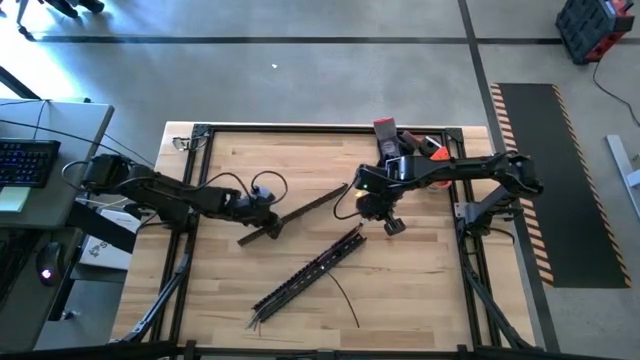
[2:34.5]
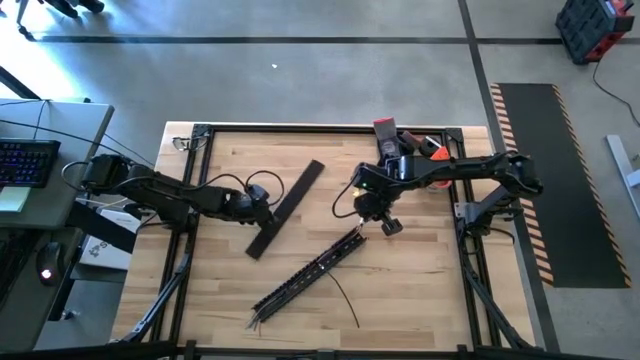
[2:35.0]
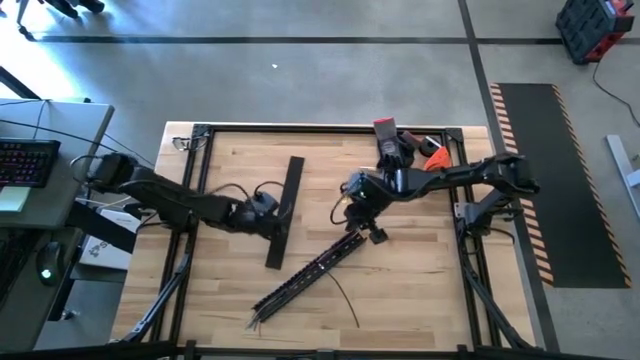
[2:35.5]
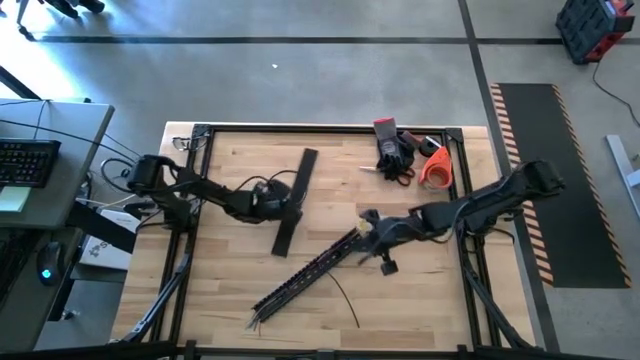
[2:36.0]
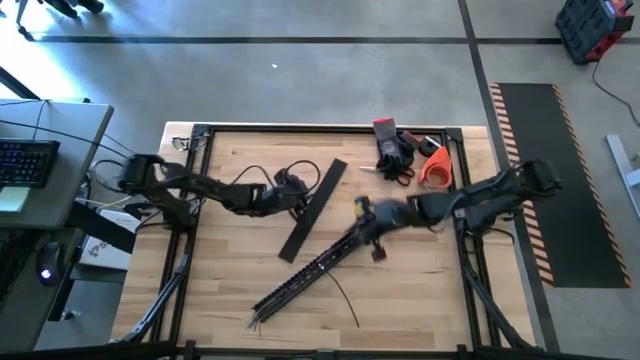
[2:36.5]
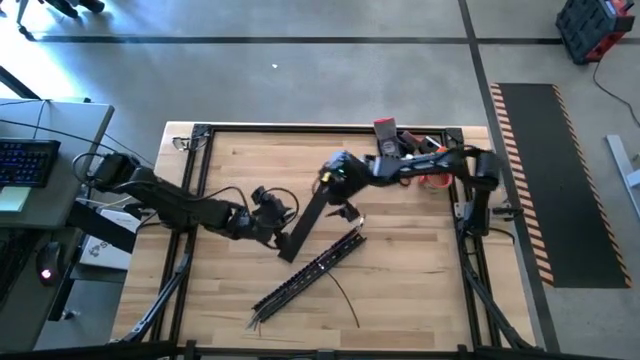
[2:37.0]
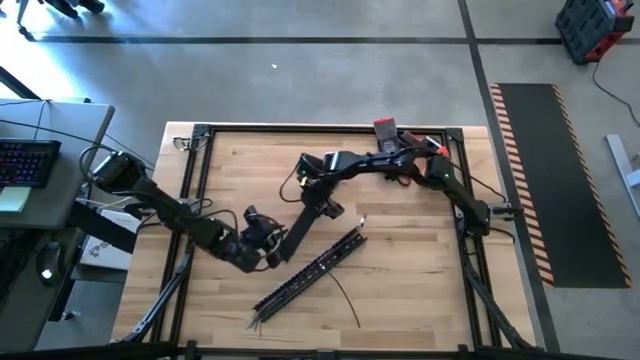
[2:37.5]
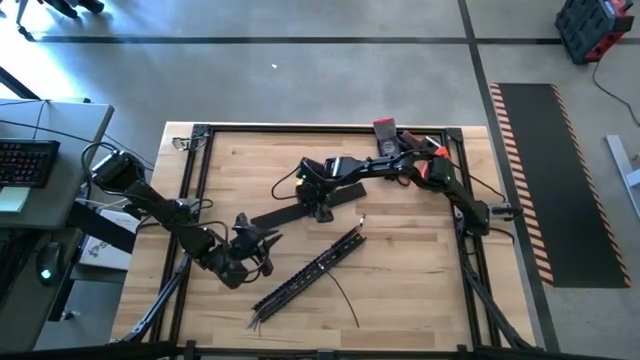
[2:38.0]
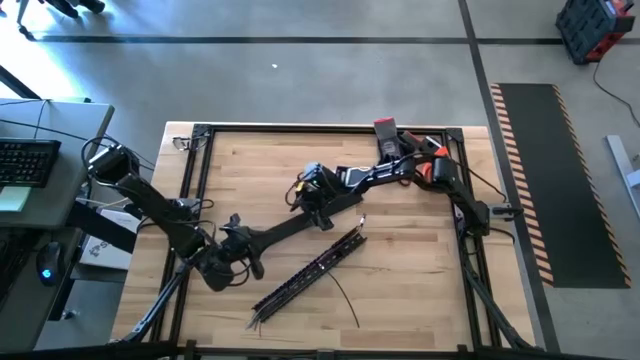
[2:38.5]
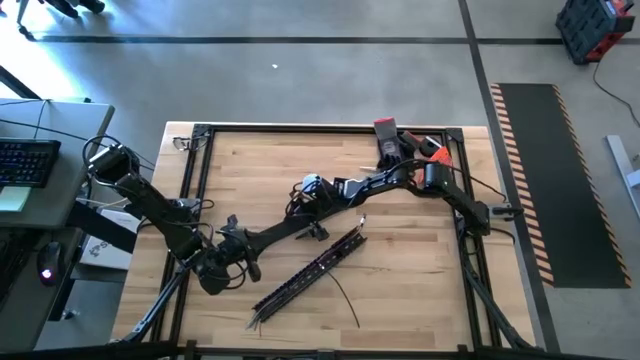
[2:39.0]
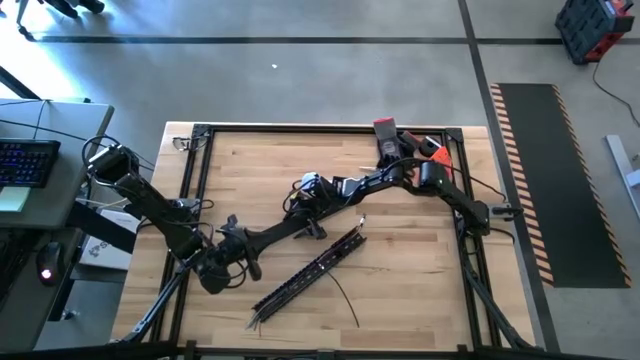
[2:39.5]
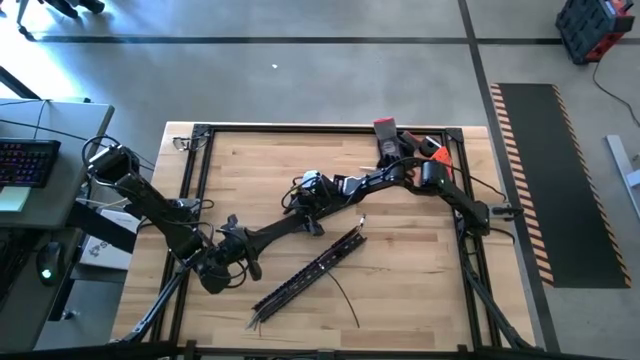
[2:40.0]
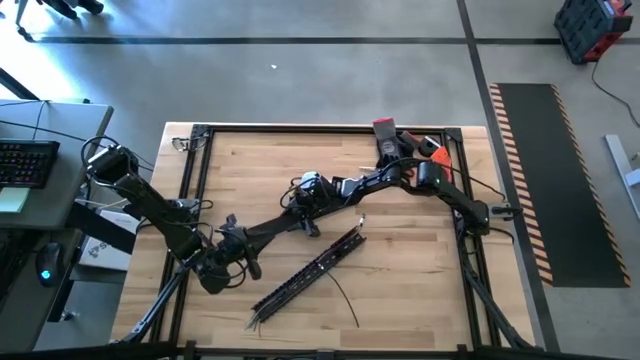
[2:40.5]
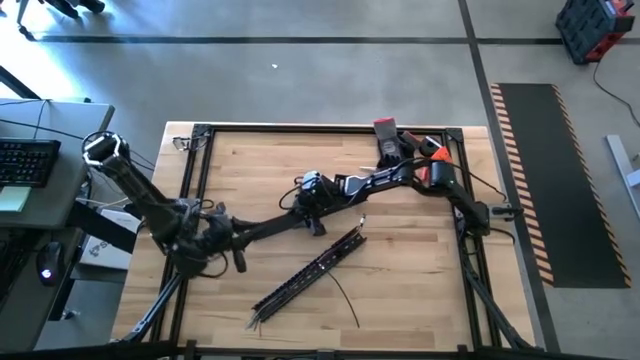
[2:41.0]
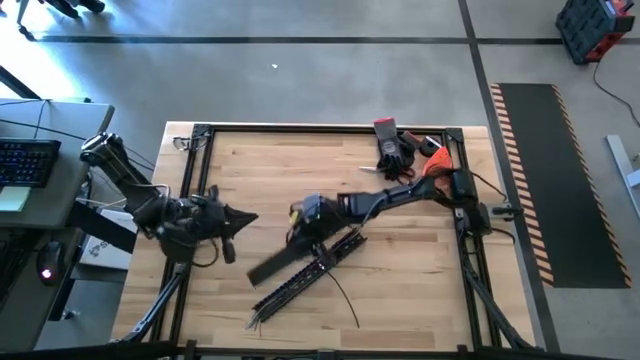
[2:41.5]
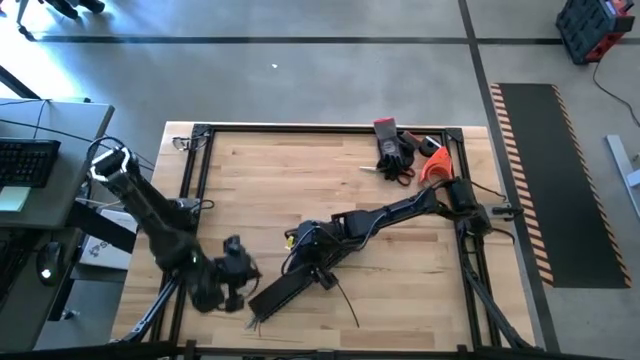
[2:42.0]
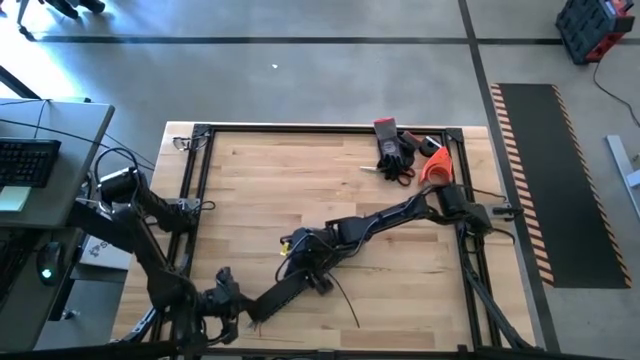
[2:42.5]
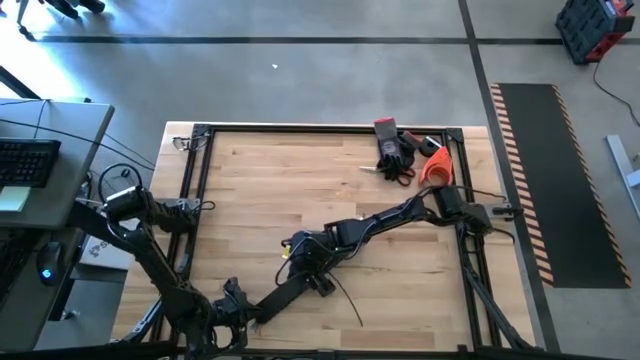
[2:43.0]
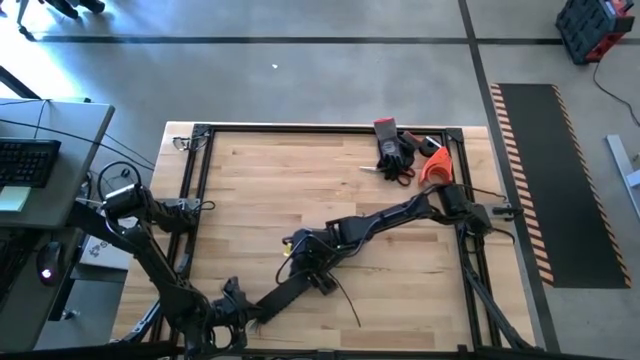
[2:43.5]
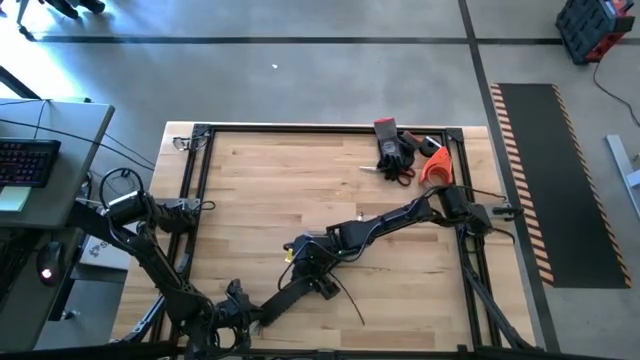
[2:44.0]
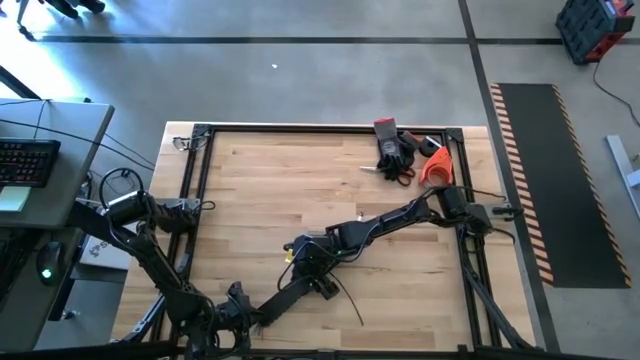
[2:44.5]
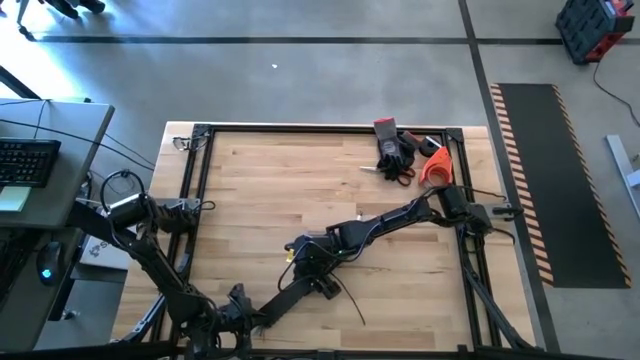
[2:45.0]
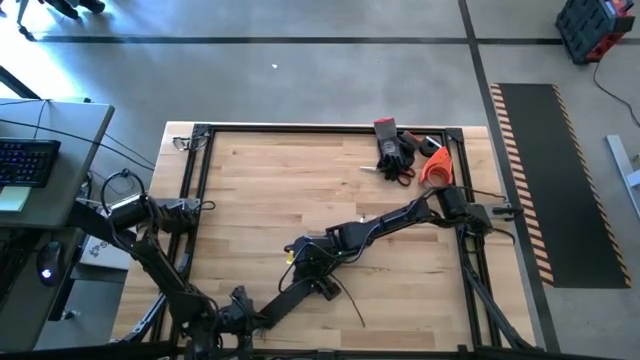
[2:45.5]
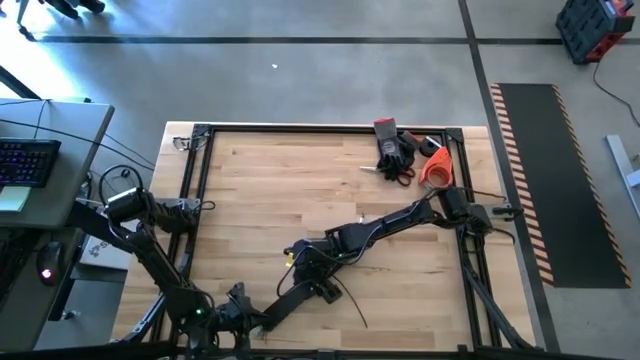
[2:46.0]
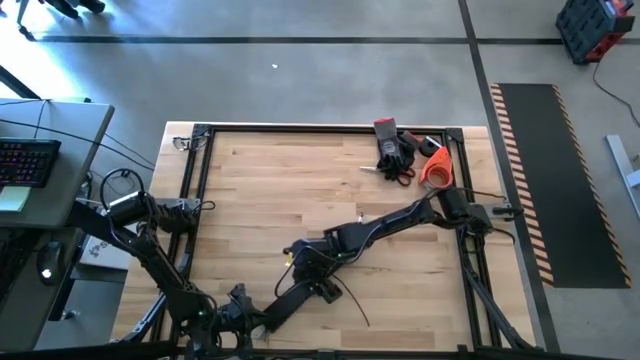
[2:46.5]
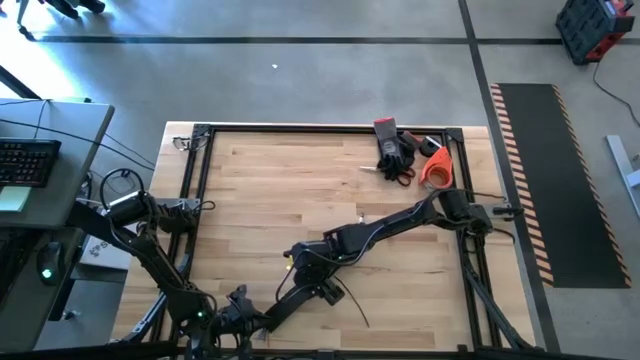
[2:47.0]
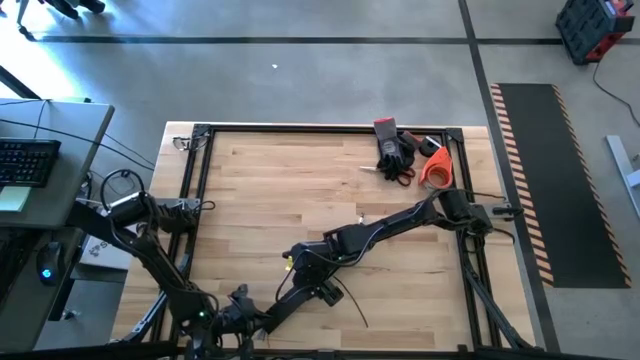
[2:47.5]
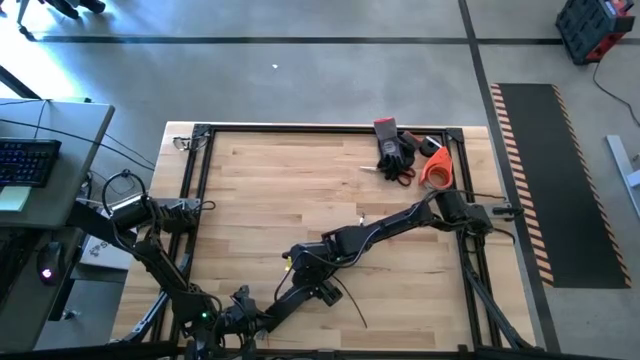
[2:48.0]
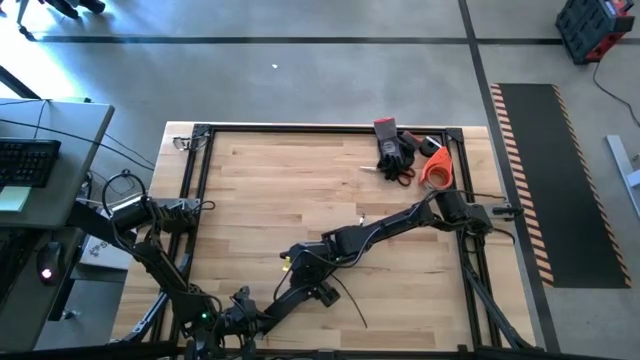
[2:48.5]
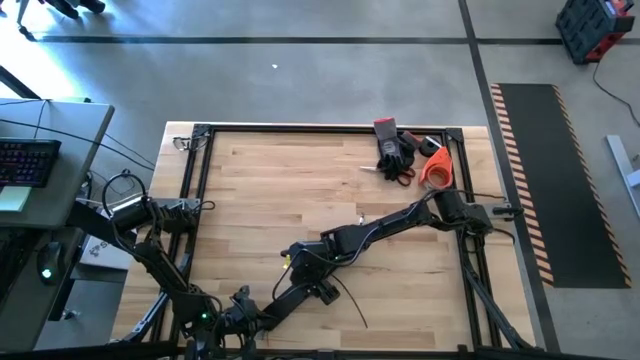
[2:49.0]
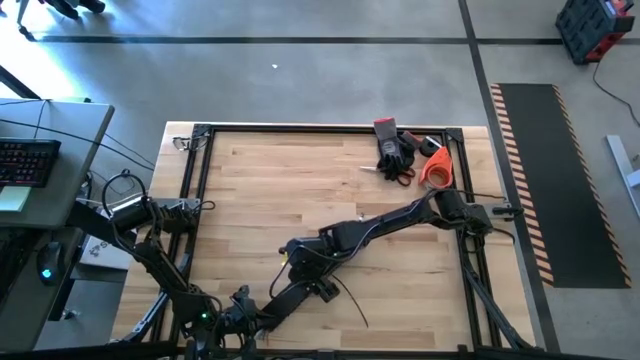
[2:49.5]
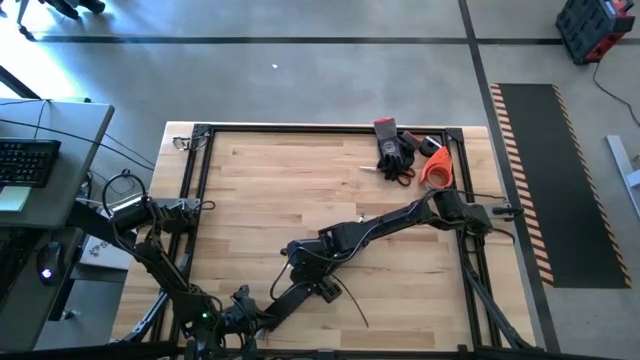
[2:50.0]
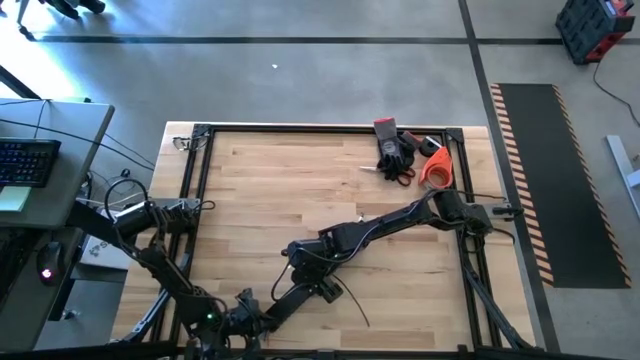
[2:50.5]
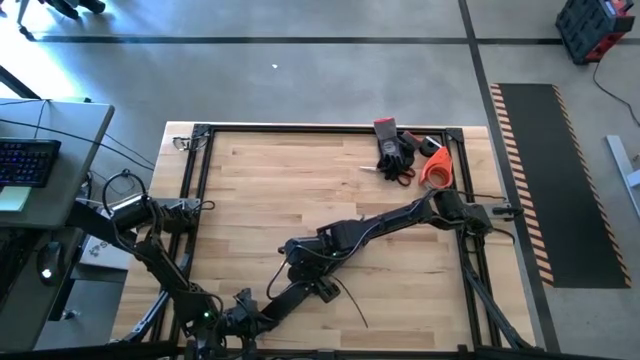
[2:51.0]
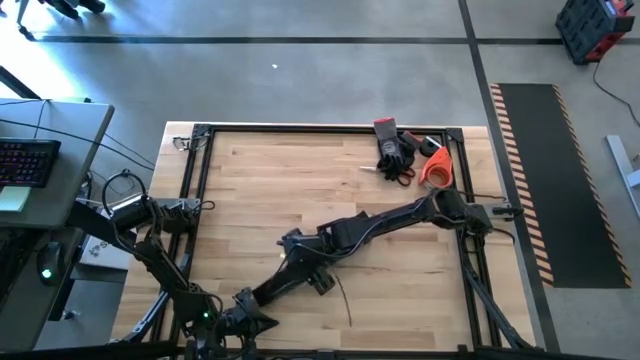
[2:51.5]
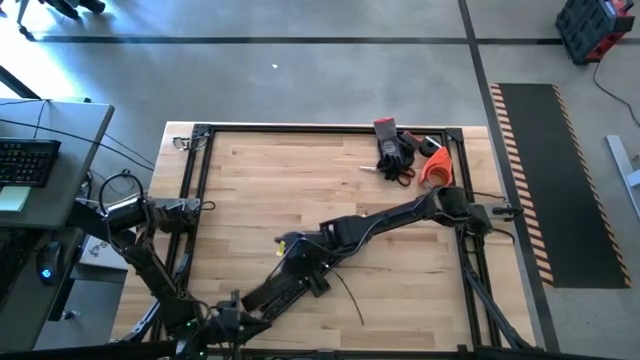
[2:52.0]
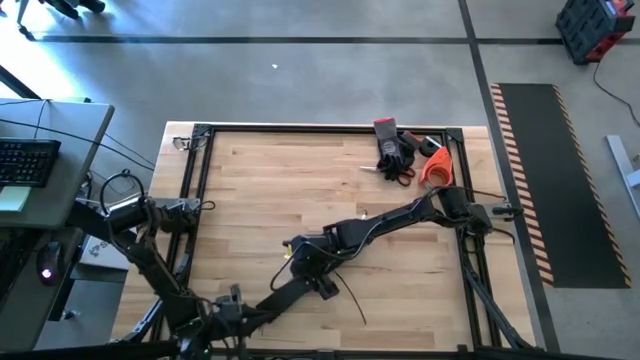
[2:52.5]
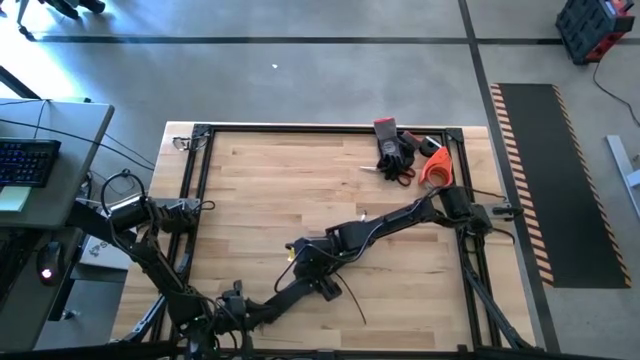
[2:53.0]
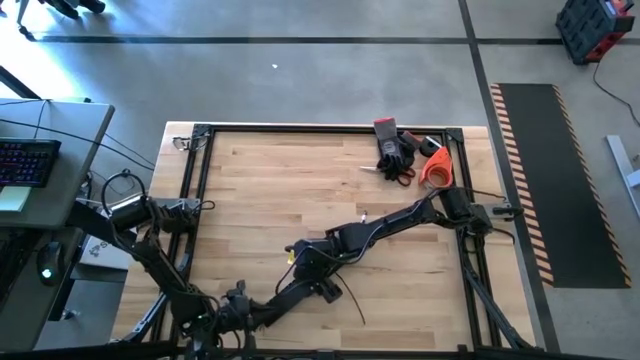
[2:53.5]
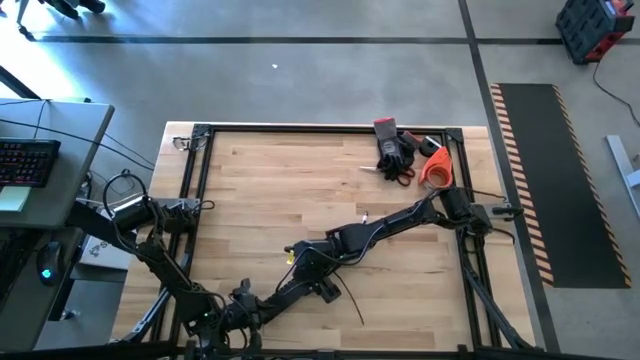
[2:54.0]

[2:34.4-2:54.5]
Task: Ziptie cables
Close the black cable duct with the black cable duct cover
